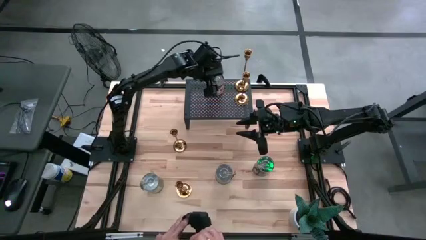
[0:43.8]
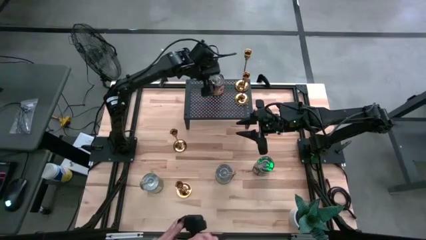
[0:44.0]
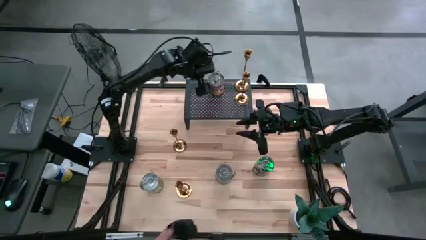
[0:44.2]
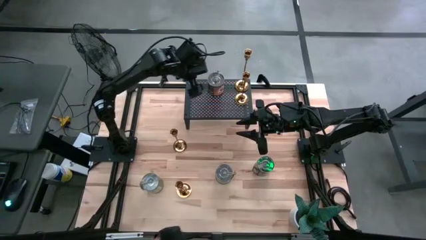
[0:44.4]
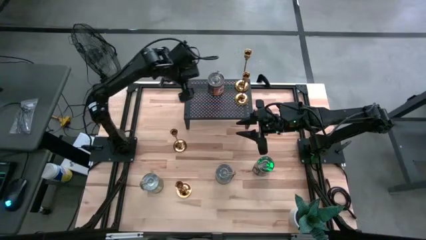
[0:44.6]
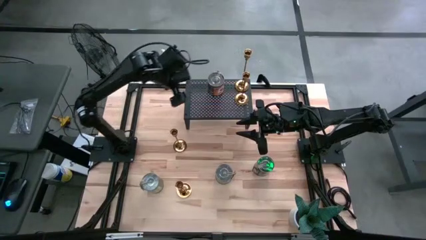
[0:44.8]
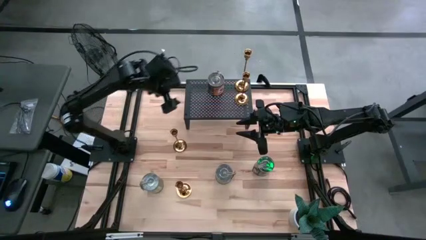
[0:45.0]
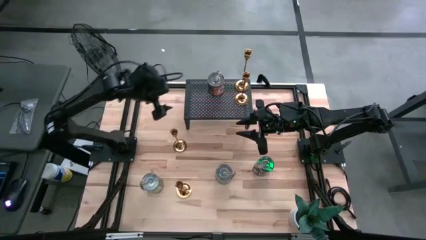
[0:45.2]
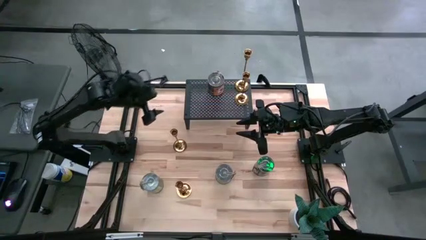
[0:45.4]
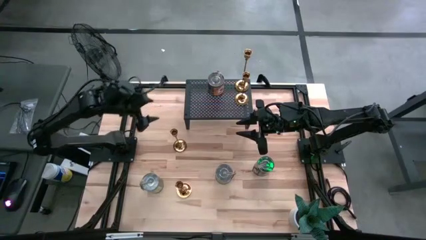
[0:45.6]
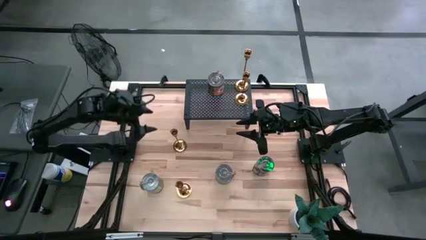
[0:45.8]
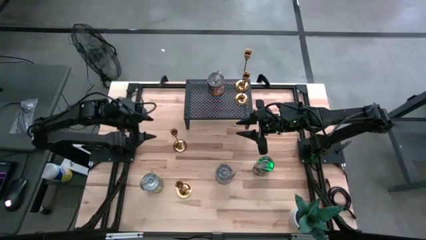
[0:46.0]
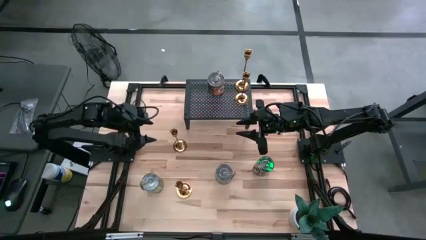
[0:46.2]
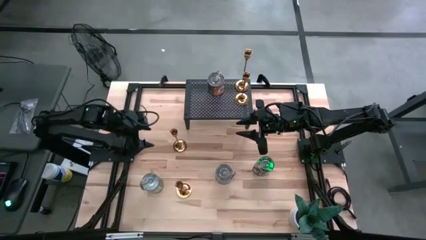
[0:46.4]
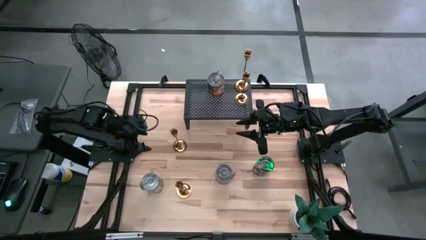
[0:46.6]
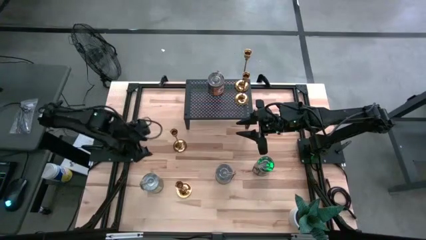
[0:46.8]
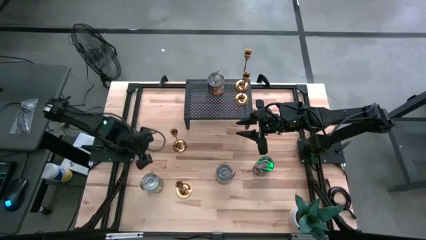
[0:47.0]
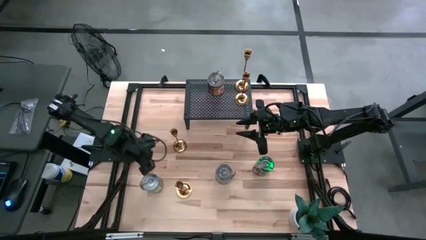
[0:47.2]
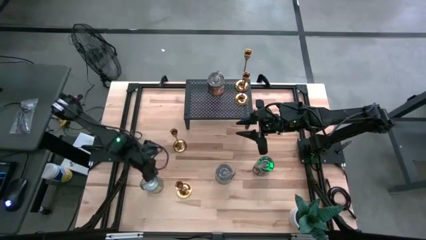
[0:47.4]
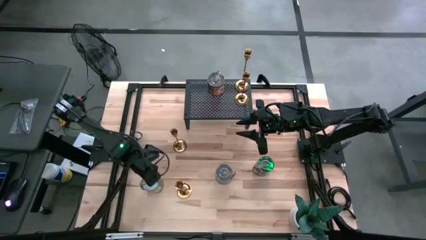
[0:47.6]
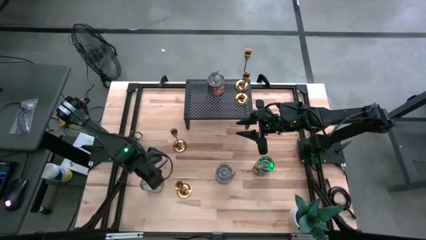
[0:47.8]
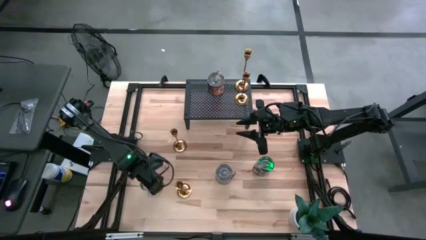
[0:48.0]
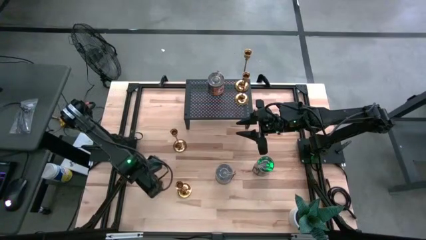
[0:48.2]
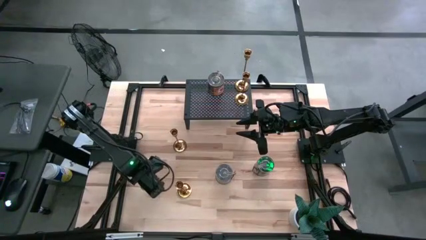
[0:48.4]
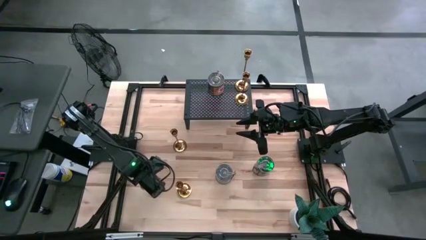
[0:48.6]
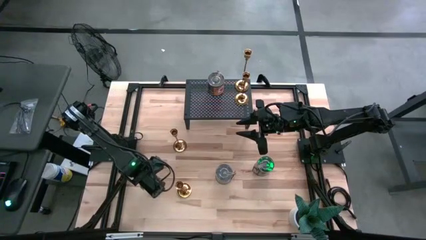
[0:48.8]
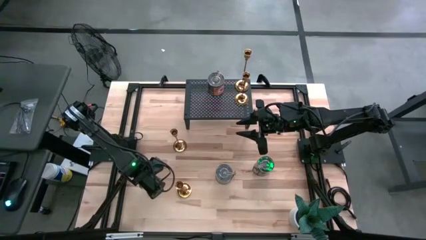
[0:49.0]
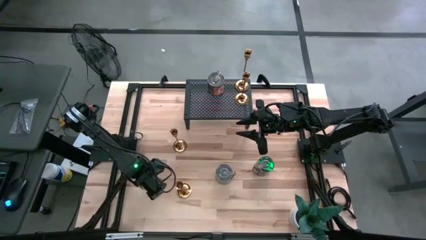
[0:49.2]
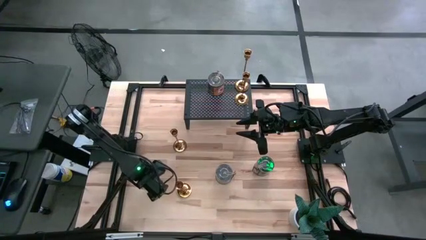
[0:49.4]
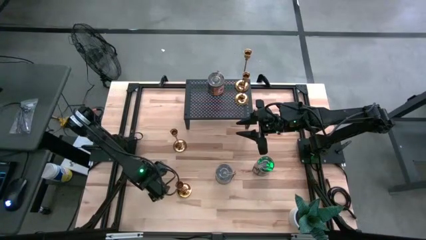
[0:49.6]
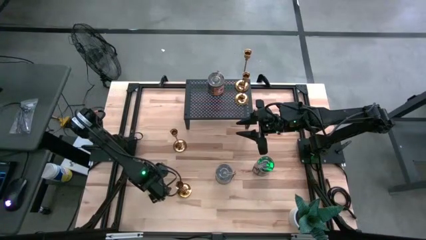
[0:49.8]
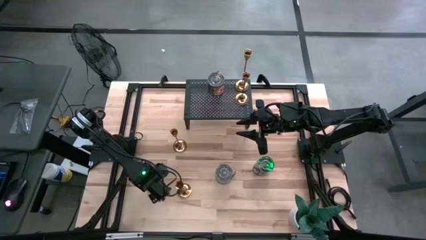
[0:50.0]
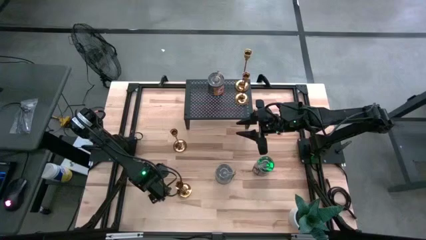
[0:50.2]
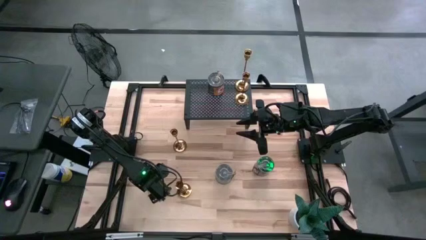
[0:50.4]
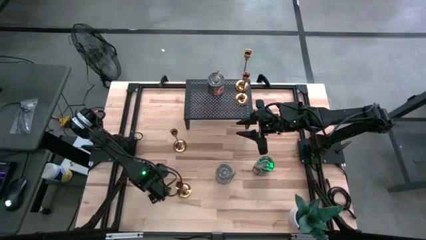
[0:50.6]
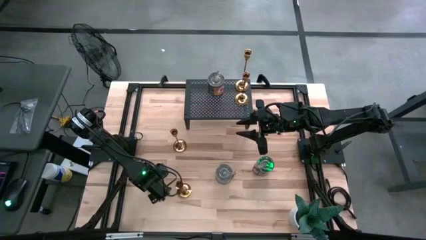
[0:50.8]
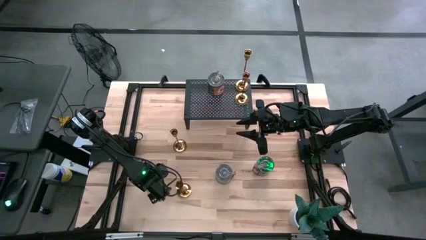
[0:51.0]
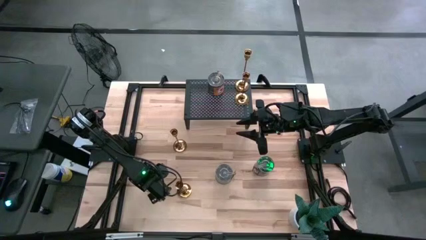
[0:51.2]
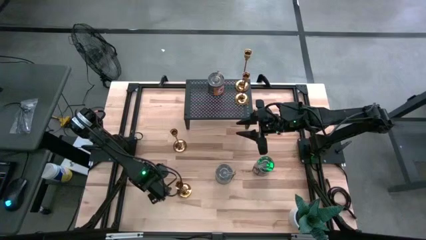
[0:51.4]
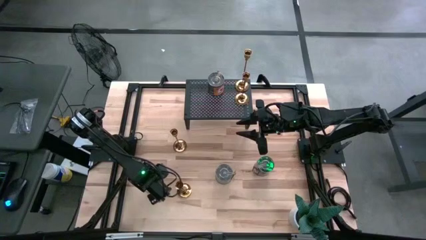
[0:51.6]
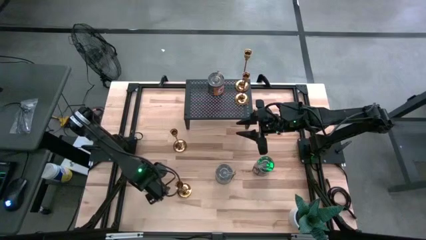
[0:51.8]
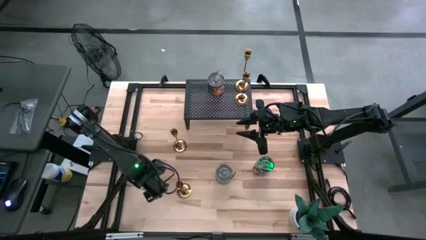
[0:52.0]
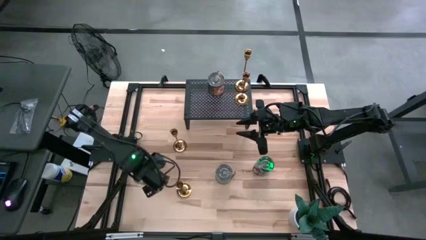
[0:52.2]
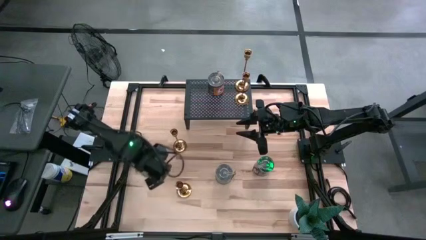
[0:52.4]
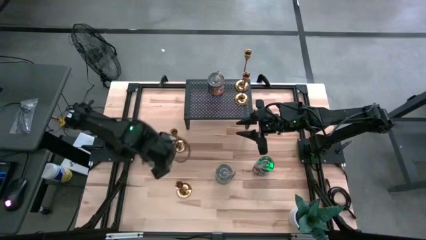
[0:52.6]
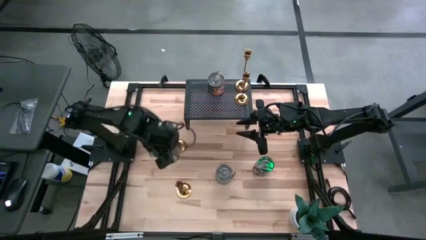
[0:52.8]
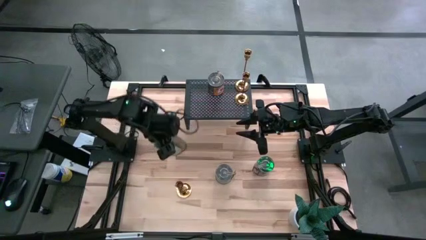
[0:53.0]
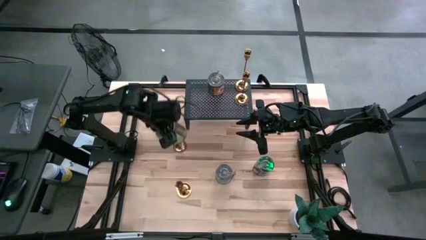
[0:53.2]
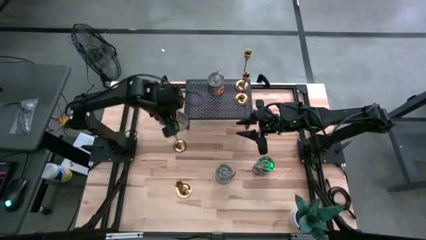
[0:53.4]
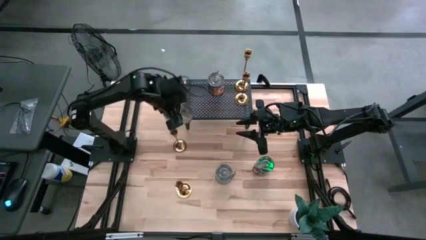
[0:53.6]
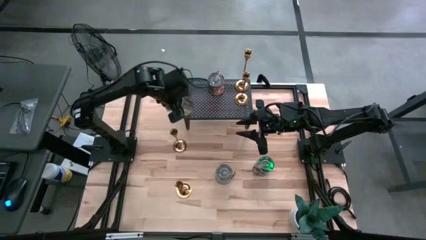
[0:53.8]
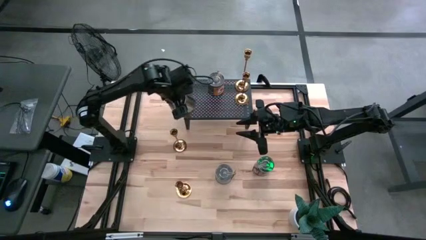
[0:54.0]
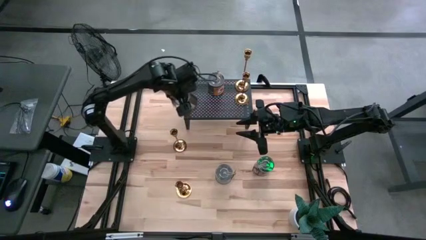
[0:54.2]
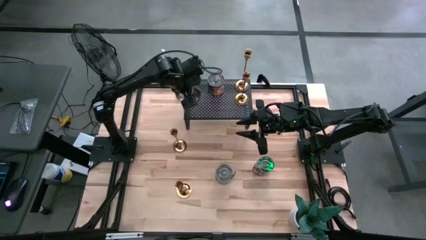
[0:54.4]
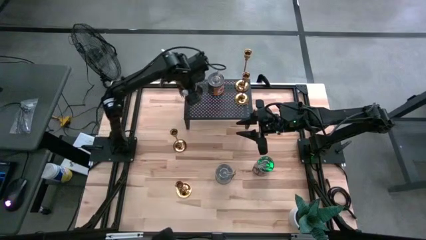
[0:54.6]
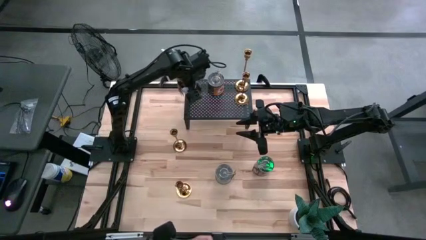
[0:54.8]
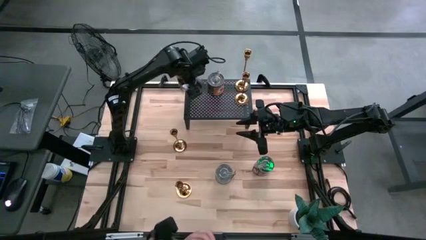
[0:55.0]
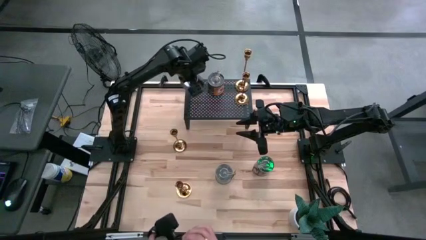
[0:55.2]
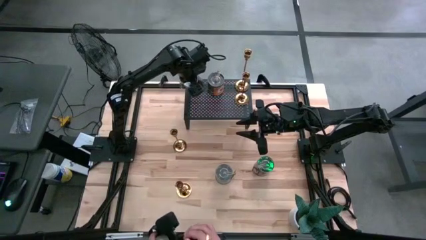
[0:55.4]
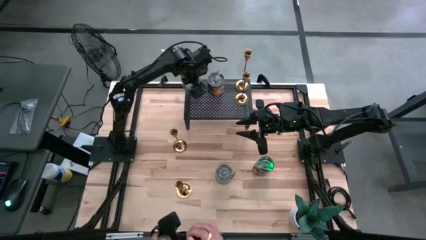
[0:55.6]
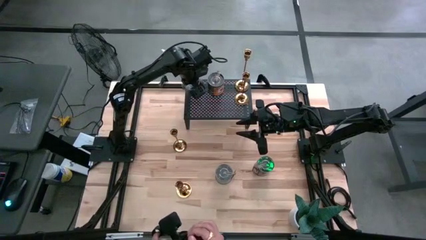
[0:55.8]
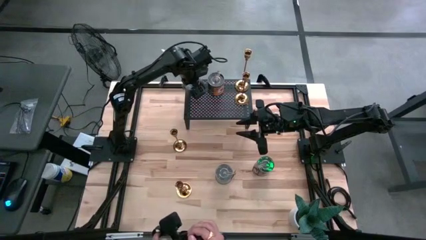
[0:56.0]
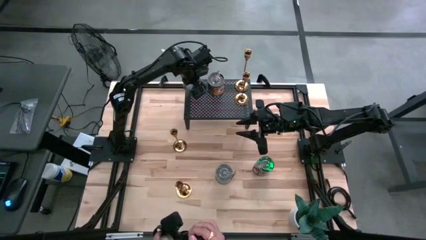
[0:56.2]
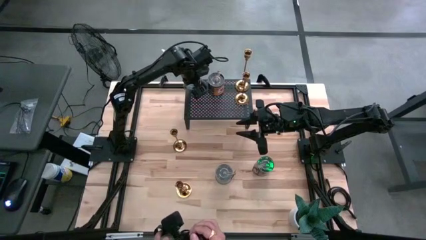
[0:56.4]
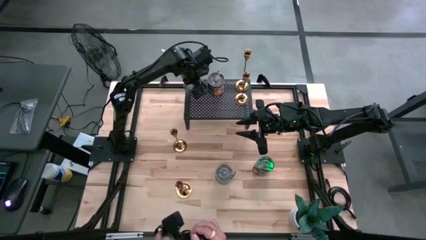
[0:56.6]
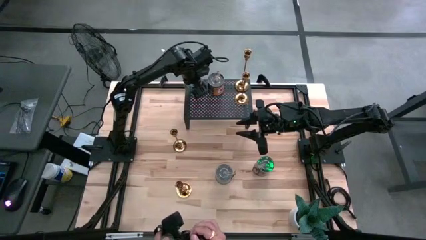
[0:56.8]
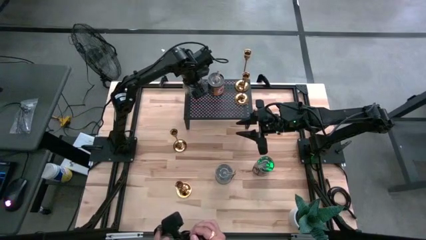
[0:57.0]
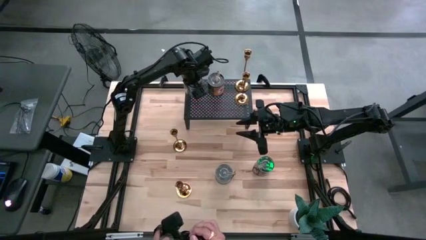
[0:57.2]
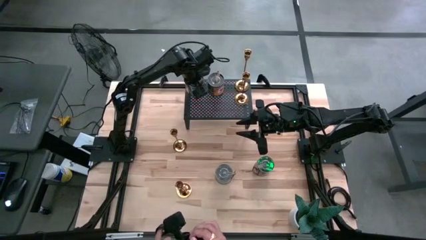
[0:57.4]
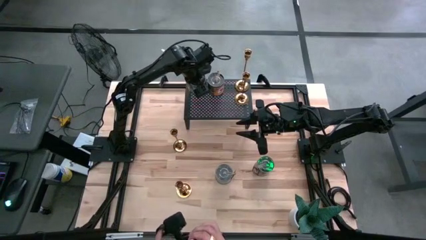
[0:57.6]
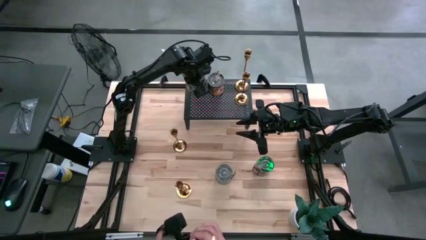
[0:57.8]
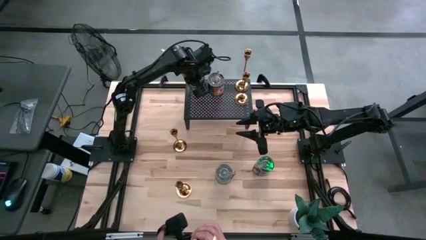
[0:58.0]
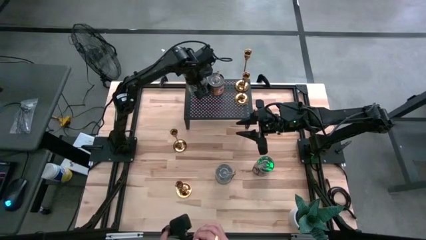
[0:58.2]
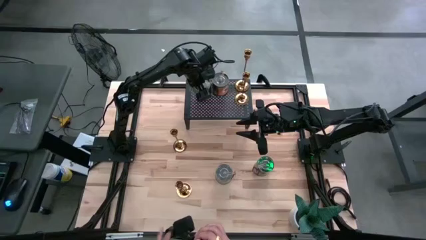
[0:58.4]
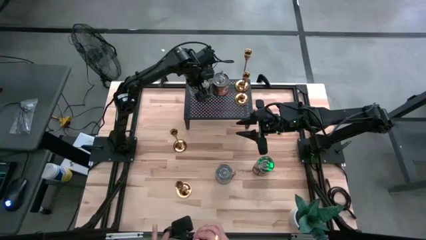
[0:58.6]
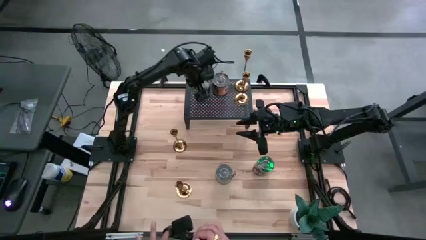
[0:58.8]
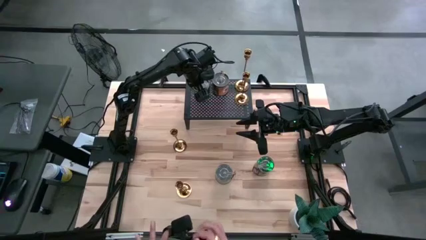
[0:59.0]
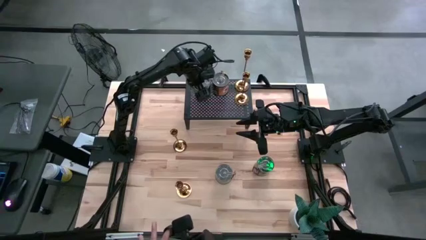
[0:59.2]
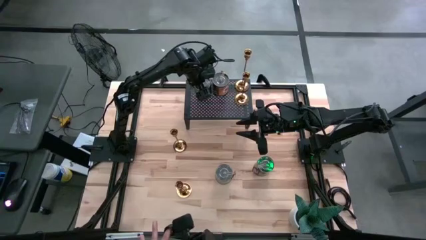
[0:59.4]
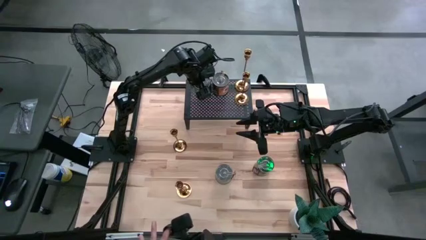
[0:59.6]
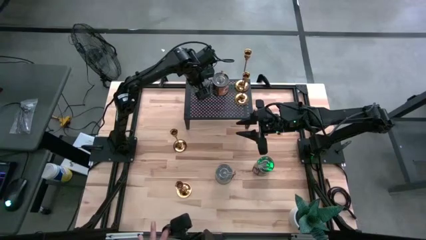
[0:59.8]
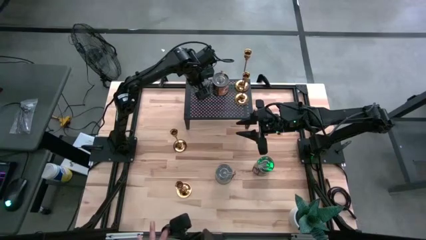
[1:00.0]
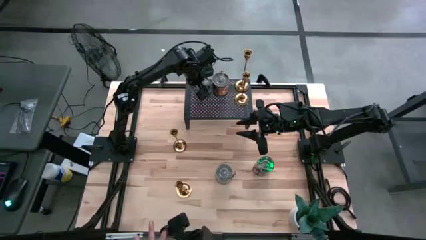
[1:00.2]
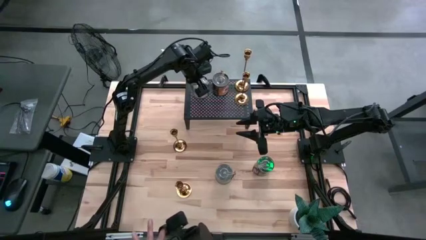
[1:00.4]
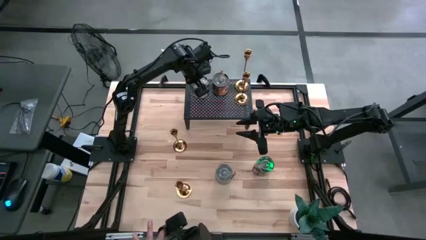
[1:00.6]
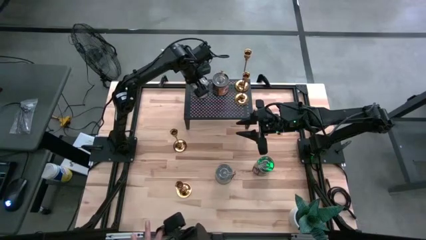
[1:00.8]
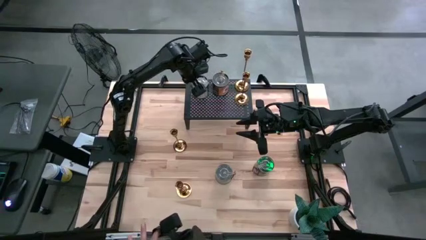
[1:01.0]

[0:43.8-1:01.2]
Task: Pick & Place candle stick holders
Put the white scented candle on the shelf
